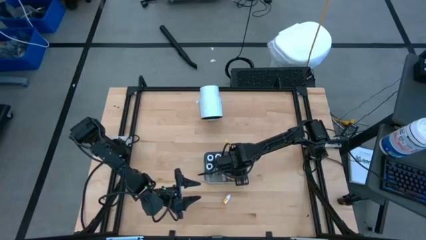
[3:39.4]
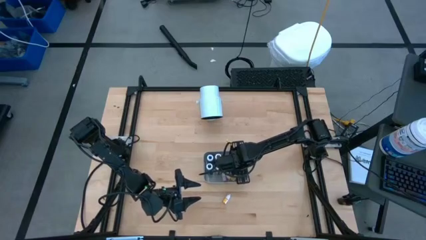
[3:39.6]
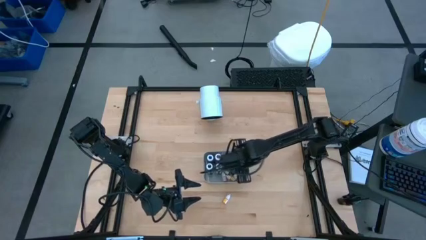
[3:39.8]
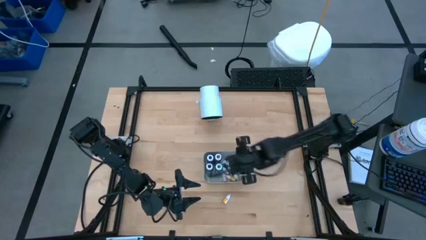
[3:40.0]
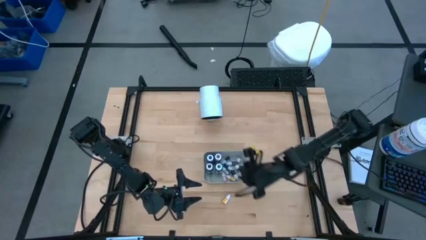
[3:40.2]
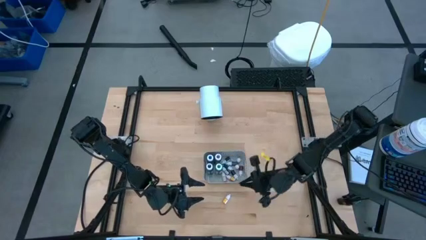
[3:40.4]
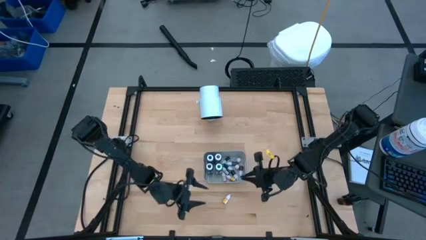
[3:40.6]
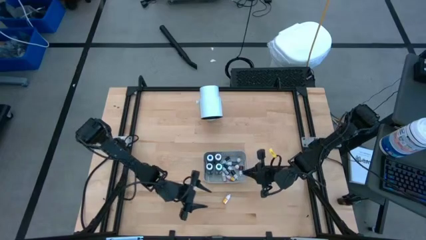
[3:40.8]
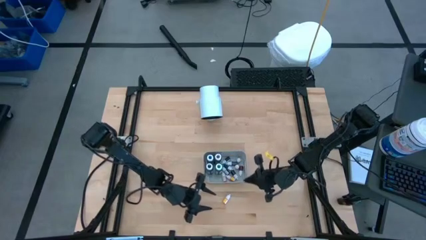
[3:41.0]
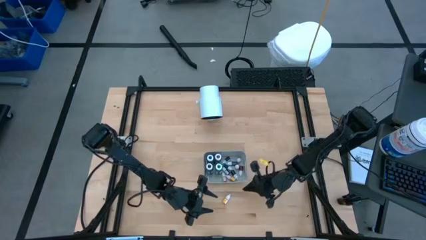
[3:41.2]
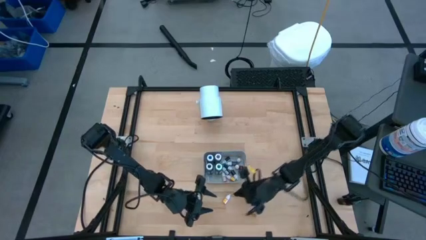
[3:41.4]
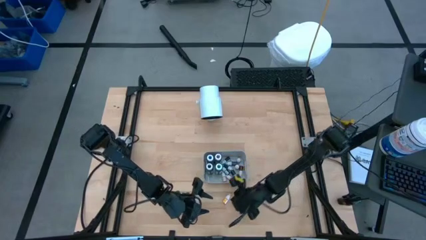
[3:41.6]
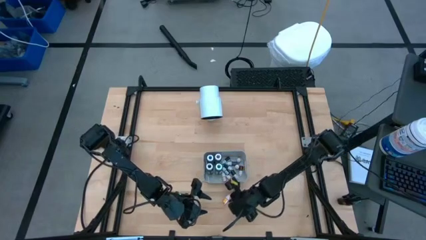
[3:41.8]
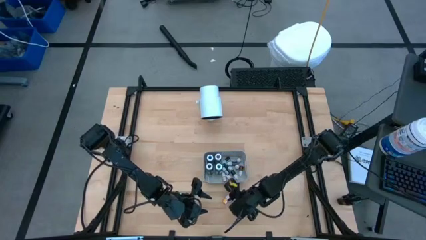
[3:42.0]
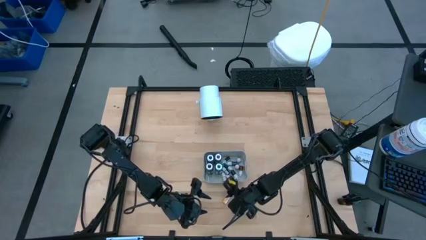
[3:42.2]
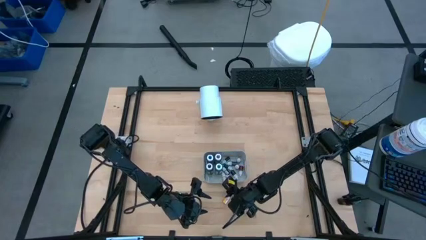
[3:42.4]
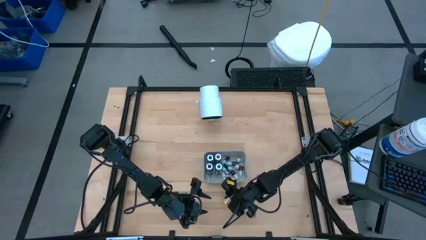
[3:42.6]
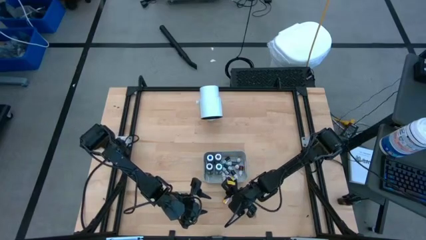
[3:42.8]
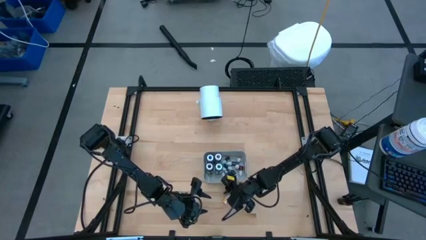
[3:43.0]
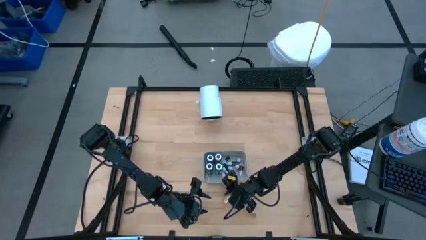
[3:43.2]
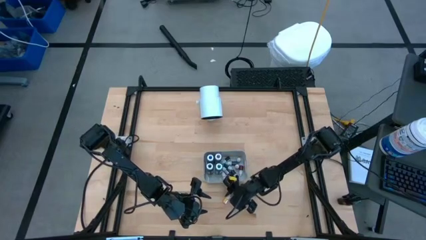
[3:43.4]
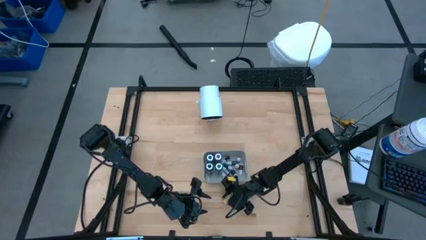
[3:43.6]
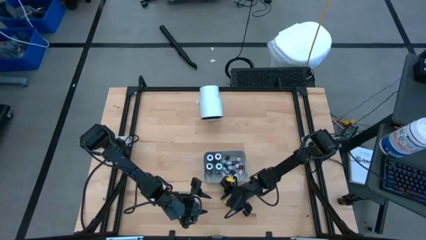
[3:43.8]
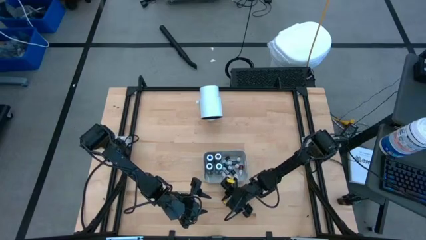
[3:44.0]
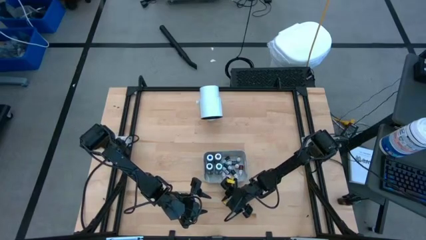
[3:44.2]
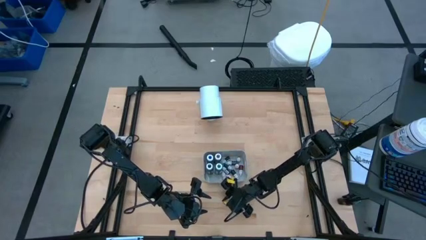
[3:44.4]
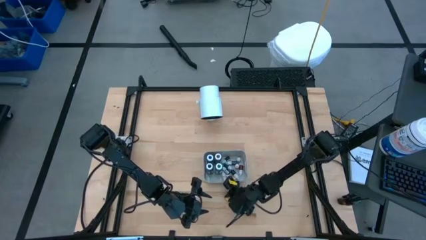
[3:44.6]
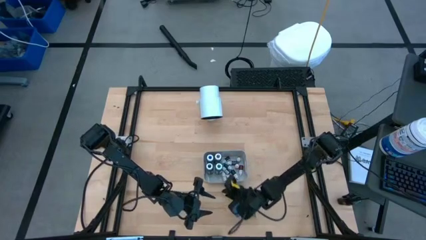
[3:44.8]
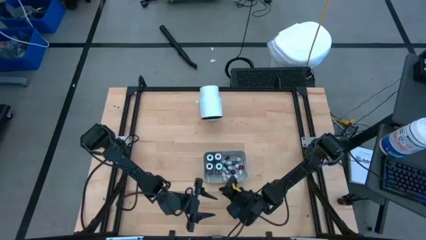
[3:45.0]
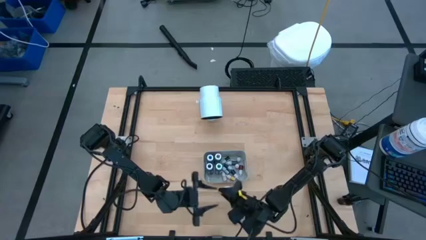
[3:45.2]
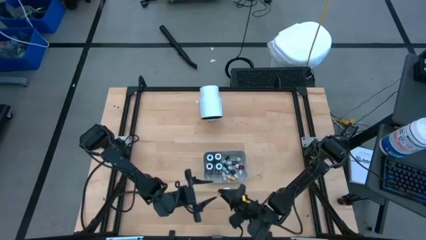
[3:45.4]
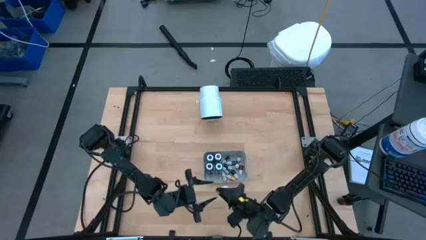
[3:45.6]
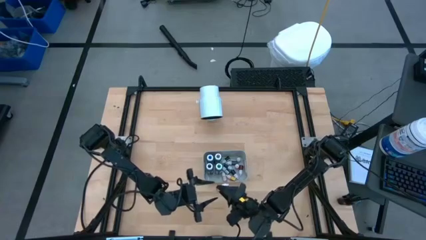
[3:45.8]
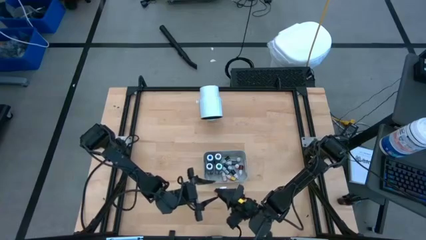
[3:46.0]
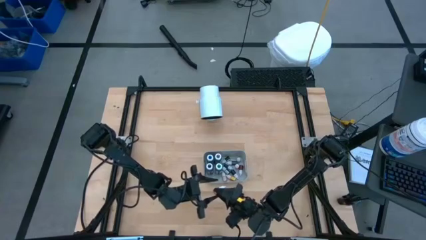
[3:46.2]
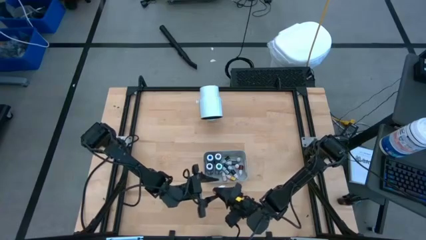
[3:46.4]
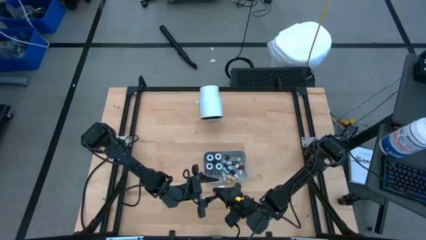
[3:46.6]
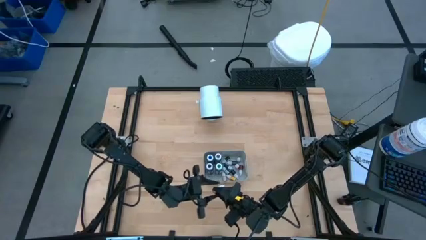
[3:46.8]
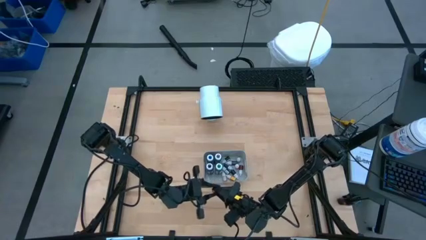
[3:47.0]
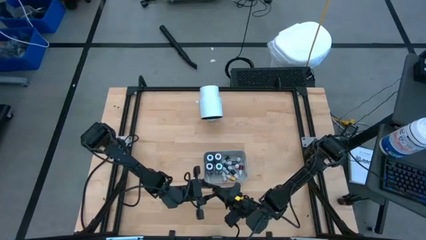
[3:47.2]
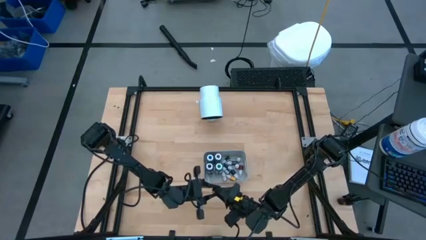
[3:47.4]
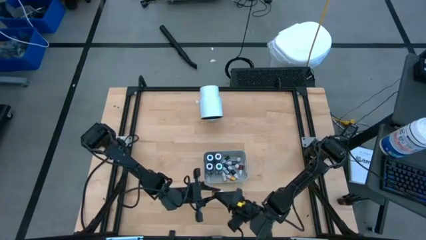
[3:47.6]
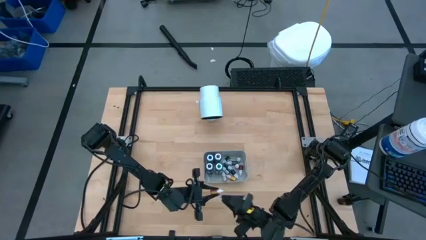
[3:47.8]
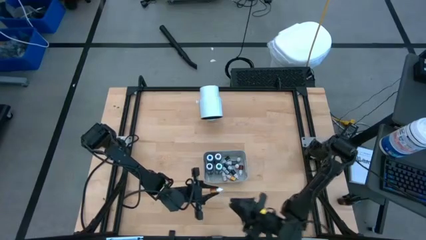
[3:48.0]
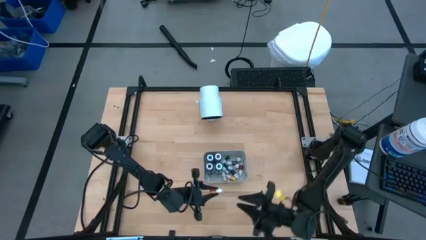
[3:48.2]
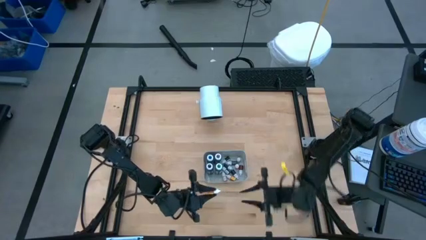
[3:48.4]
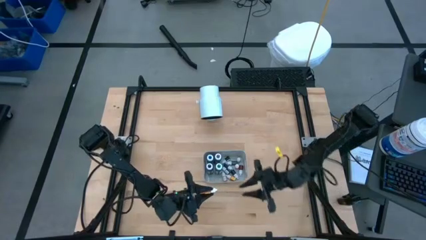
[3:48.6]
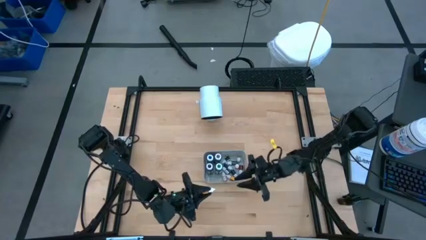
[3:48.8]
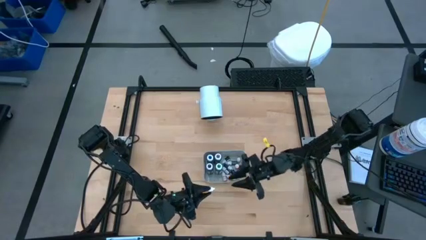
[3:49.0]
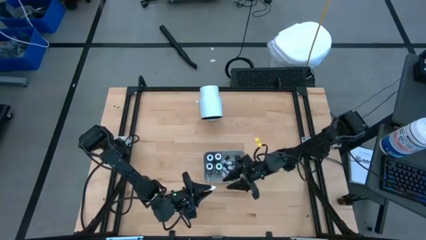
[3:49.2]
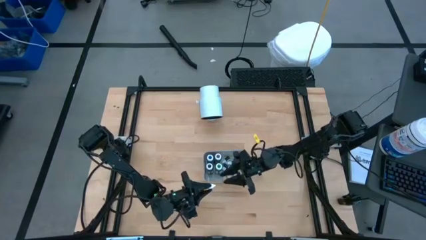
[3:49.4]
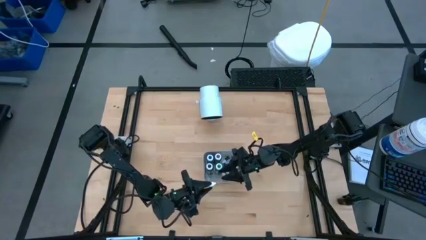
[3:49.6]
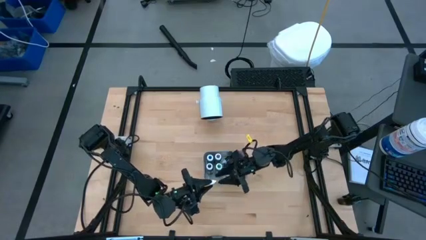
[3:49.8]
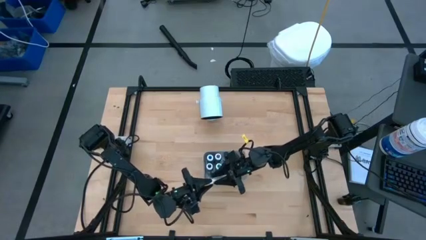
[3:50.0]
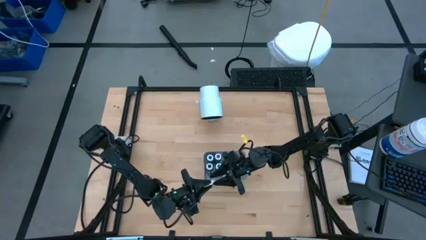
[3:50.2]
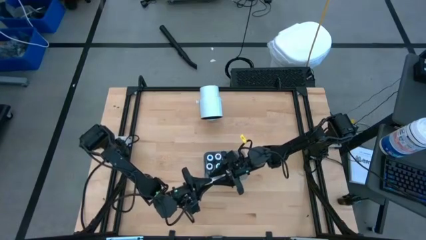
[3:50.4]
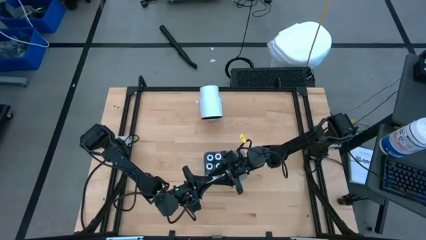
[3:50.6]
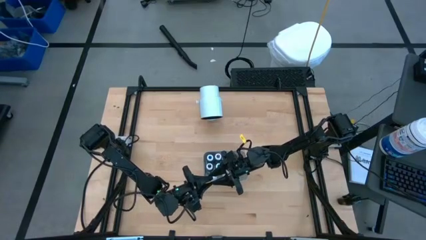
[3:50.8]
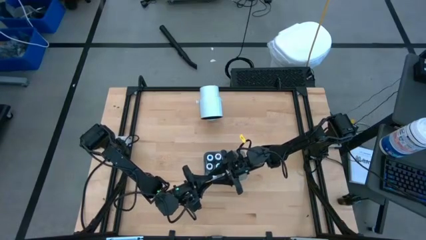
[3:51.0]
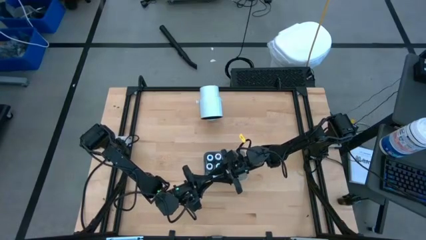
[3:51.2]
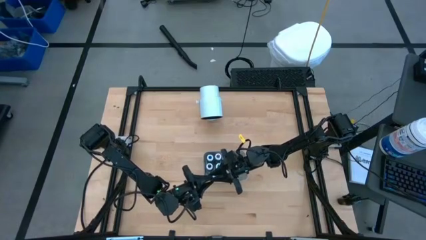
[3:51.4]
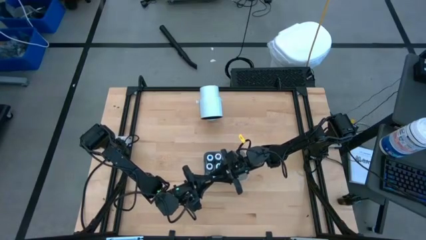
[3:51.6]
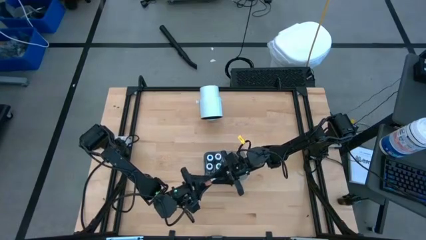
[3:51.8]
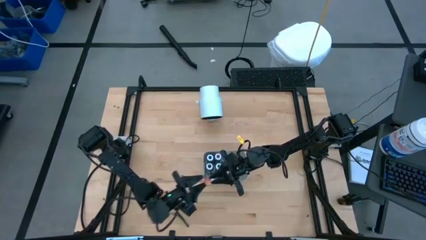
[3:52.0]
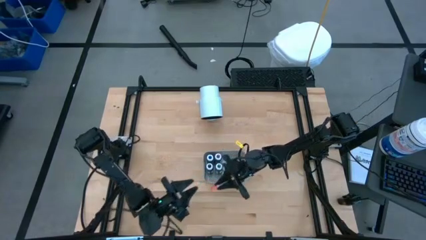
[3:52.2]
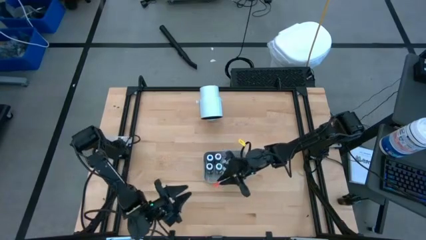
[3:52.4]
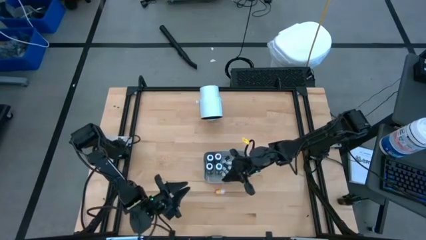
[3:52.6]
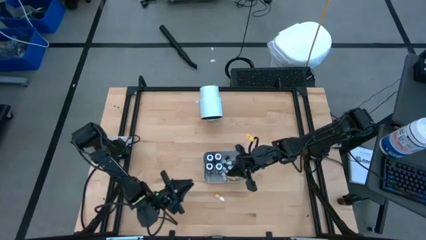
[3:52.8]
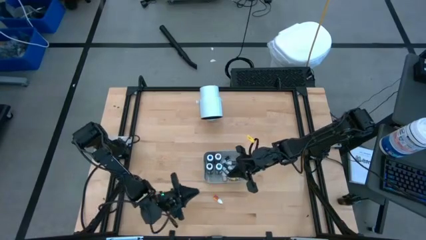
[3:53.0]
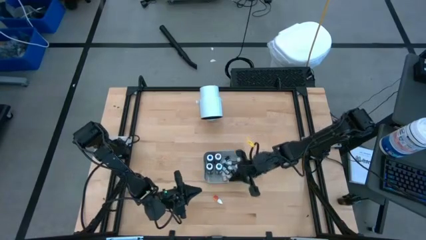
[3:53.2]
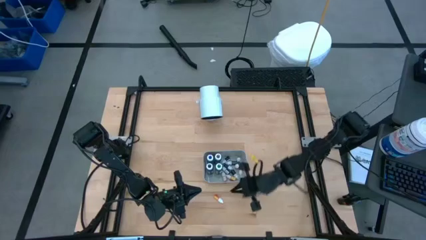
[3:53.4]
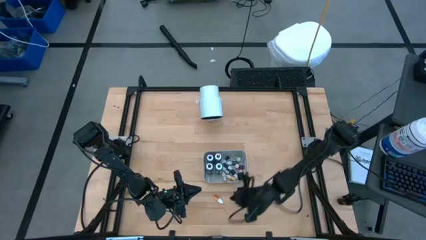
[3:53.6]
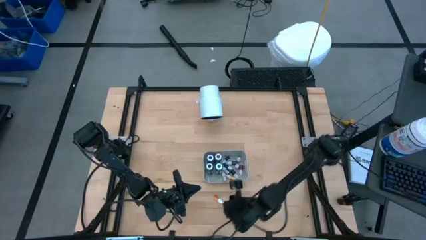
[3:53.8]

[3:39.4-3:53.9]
Task: Pick & Place food coloring
Put the orange food coloring bottle into the gray bin
